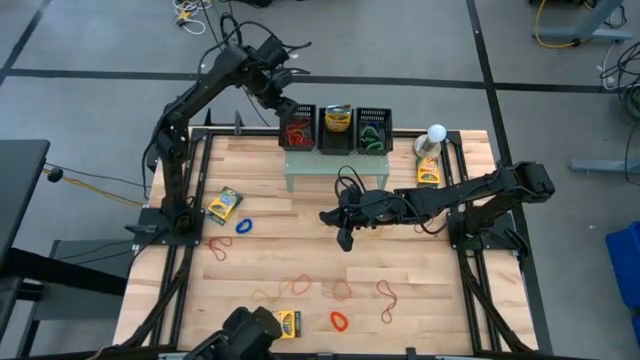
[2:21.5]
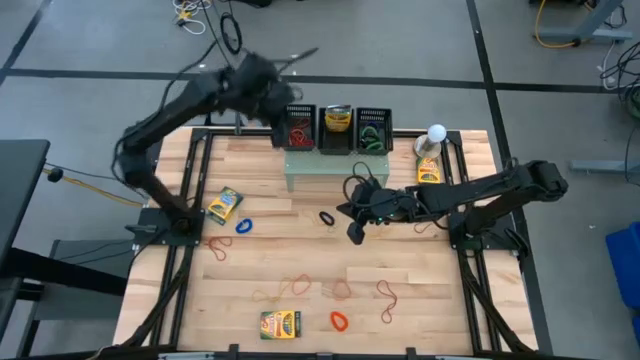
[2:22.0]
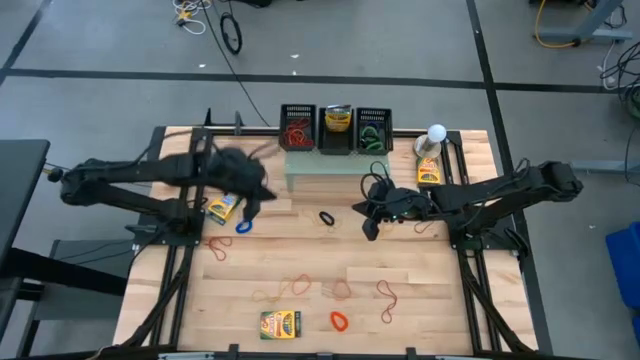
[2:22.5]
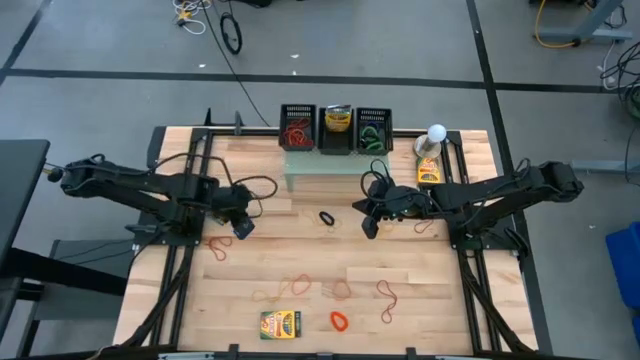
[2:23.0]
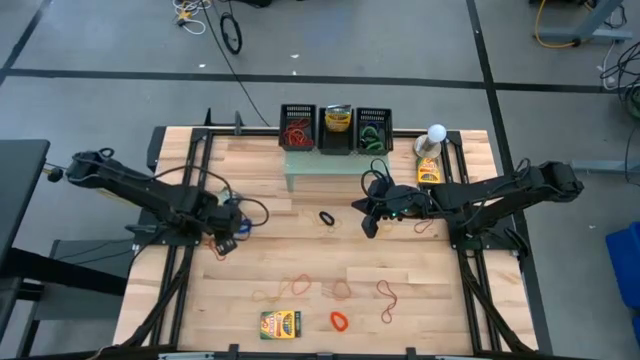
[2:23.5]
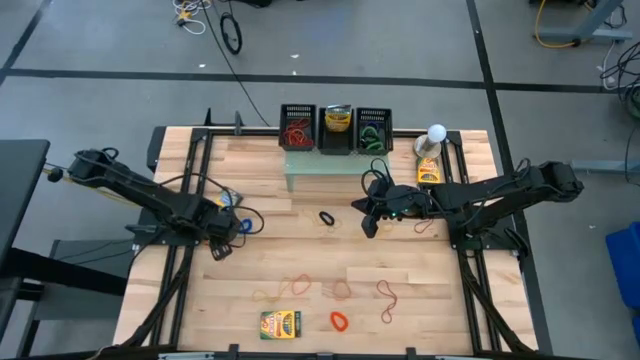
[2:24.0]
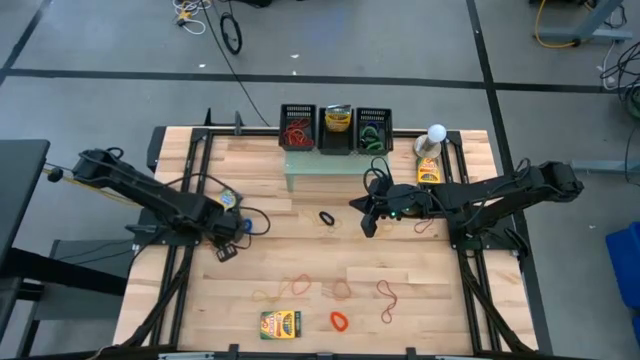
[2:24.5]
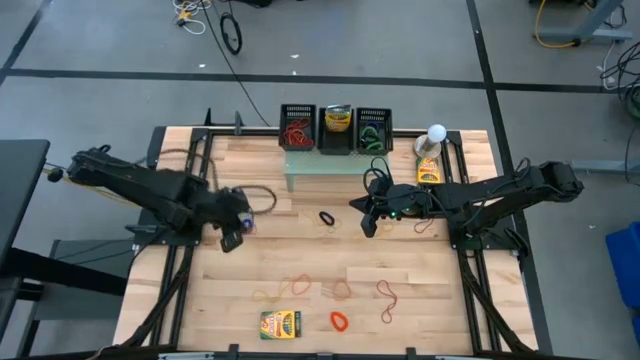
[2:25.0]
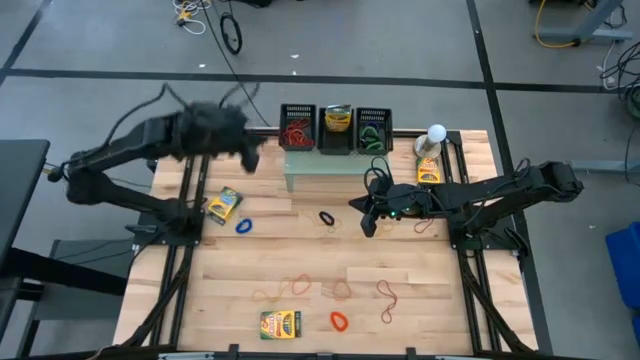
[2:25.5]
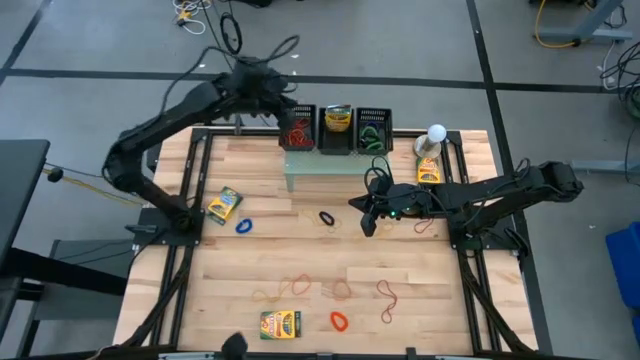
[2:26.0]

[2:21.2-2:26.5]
Task: Pick & Place Office Desk Supplies
Put the red rubber band into the left black bin on the shelf

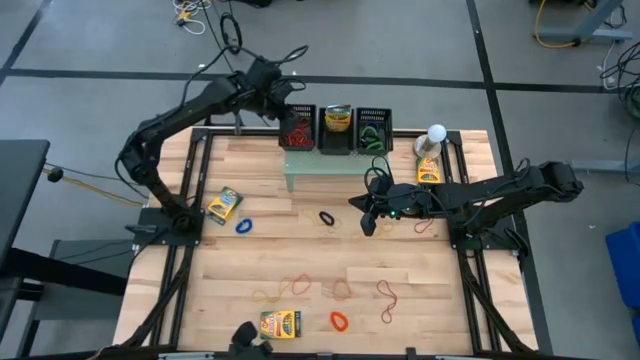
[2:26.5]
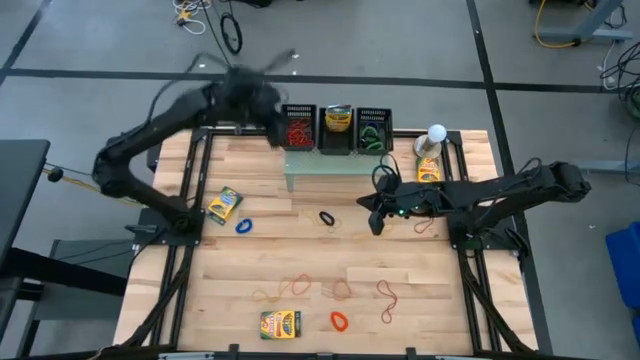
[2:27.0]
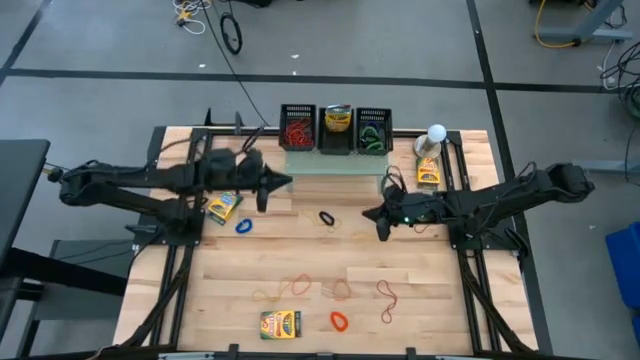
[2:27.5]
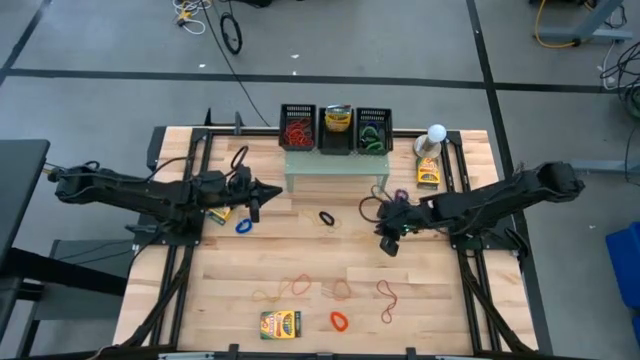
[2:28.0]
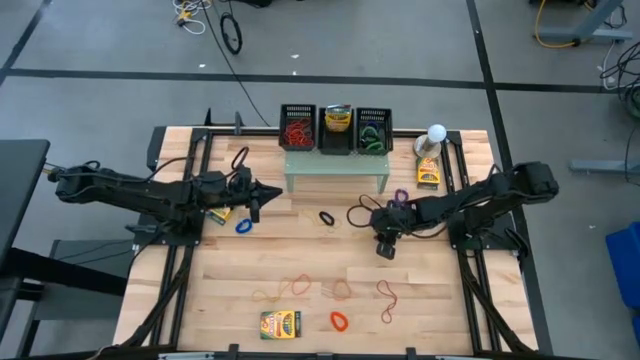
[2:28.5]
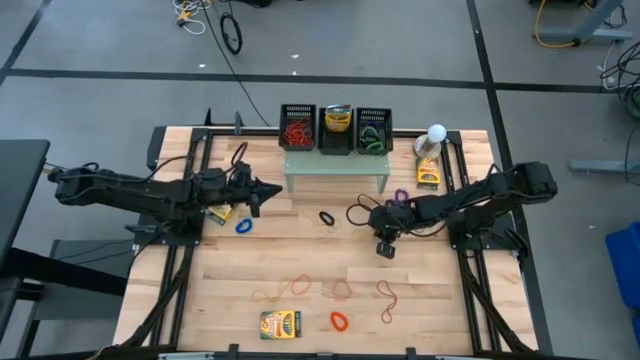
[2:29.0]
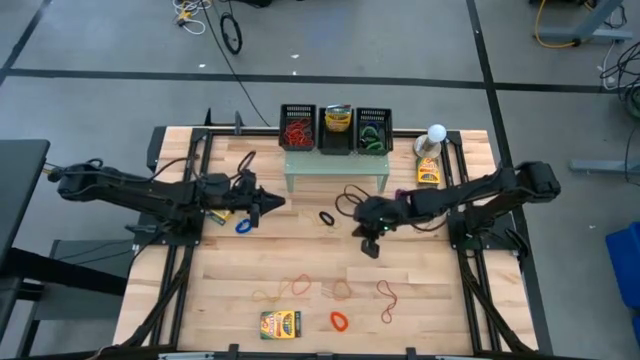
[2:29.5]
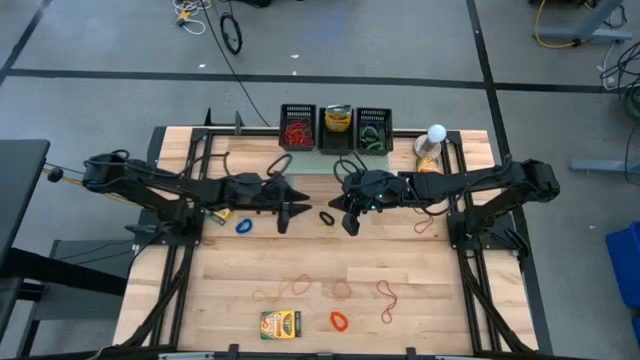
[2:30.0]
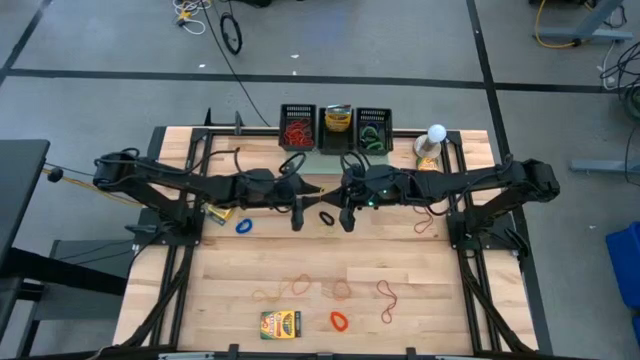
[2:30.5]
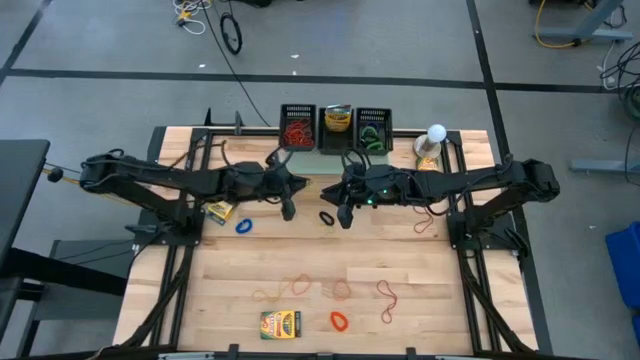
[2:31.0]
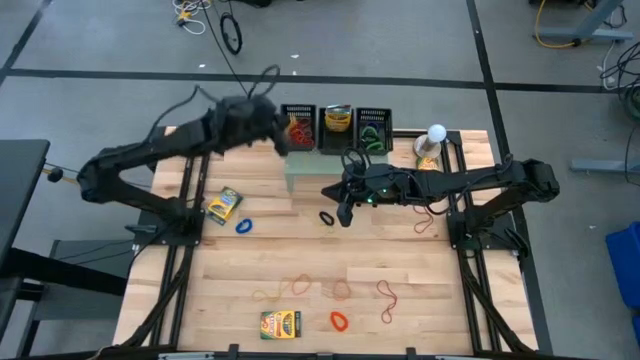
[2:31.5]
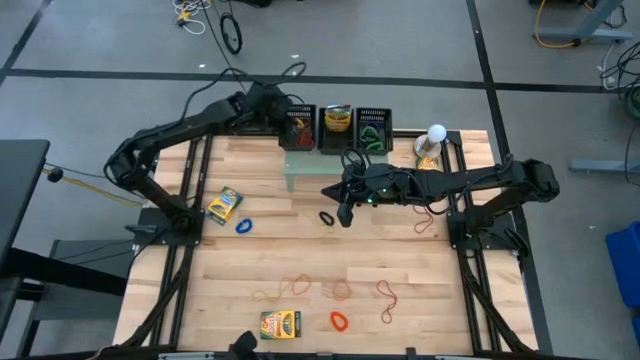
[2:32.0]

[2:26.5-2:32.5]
Put the yellow rubber band into the left black bin on the shelf

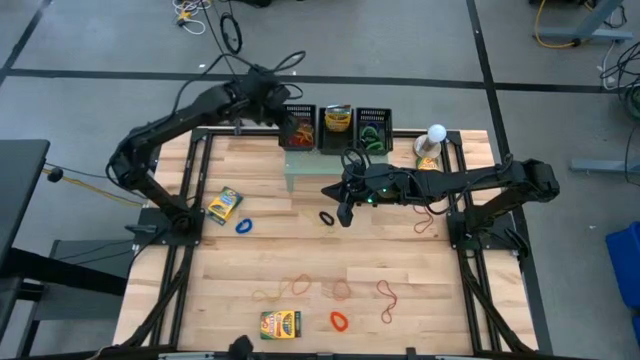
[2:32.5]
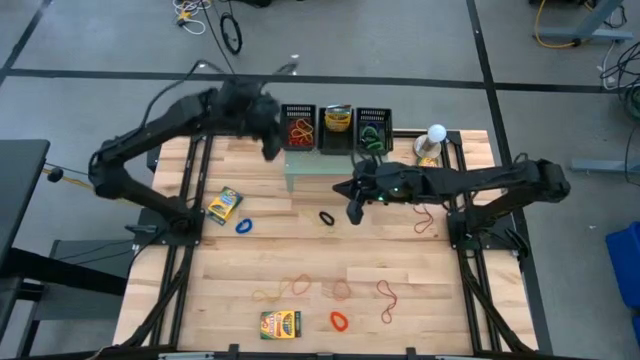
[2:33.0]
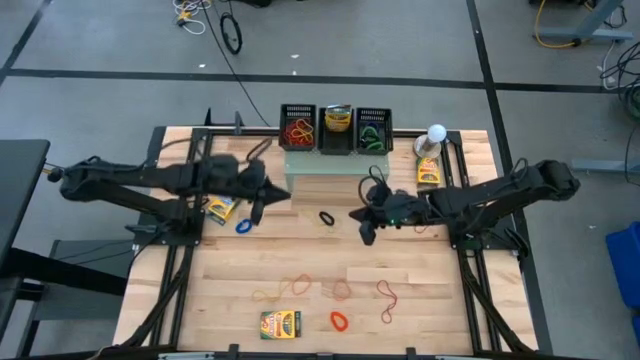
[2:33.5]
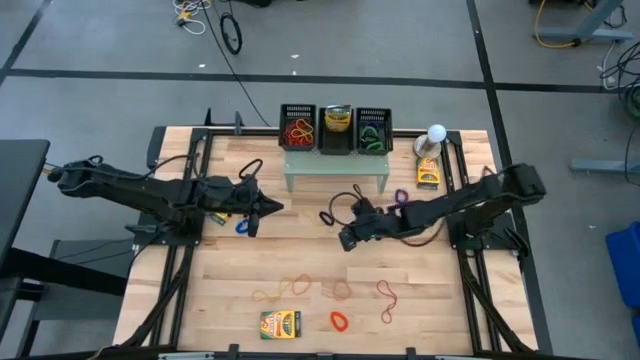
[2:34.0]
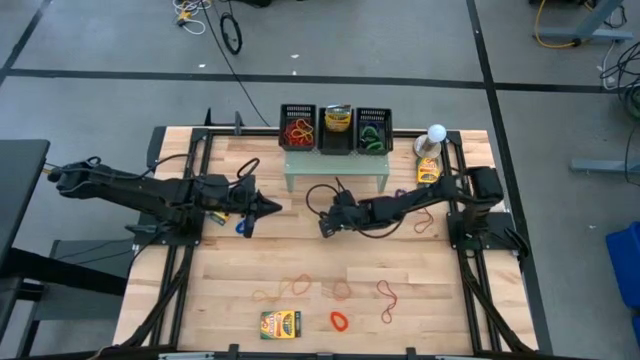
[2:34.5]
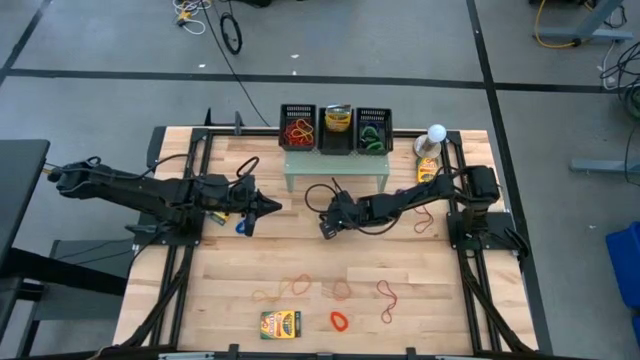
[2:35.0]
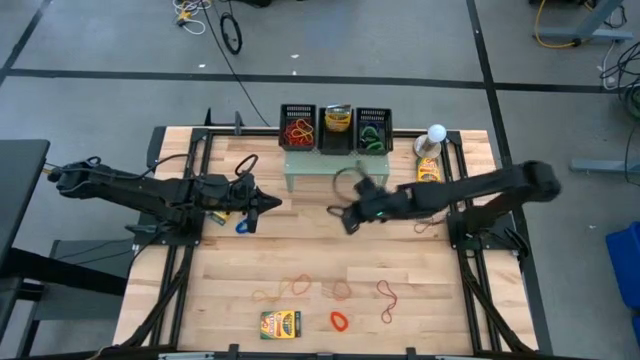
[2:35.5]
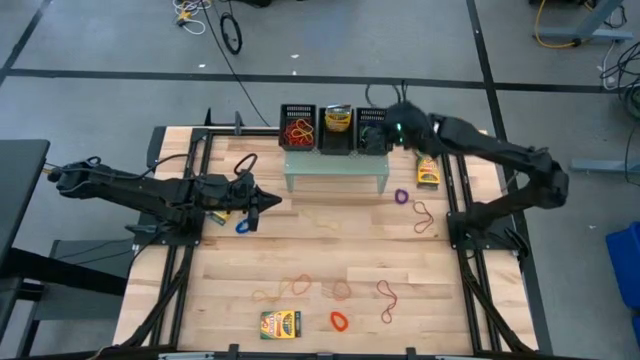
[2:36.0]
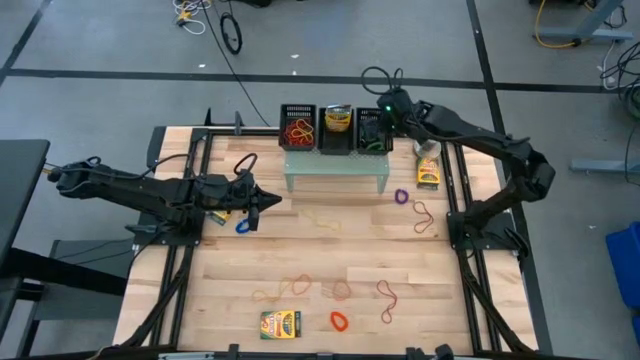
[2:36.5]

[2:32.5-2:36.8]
Put the black spring bracelet into the right black bin on the shelf

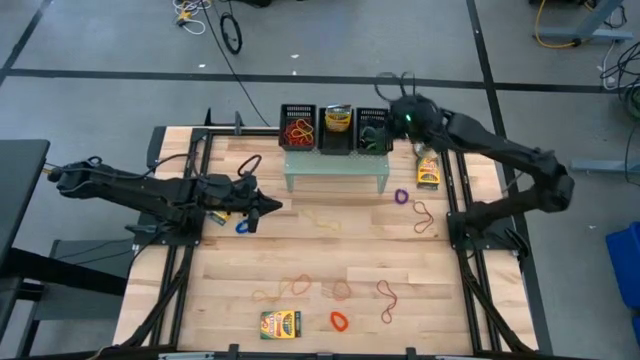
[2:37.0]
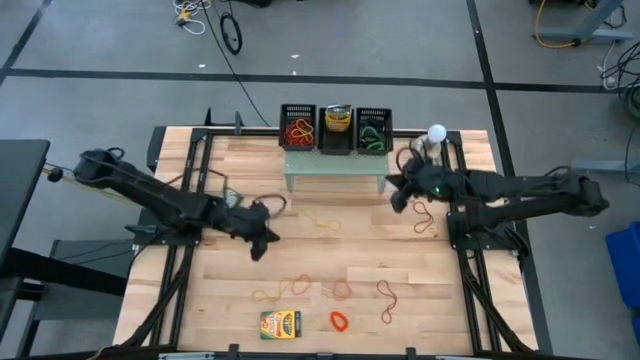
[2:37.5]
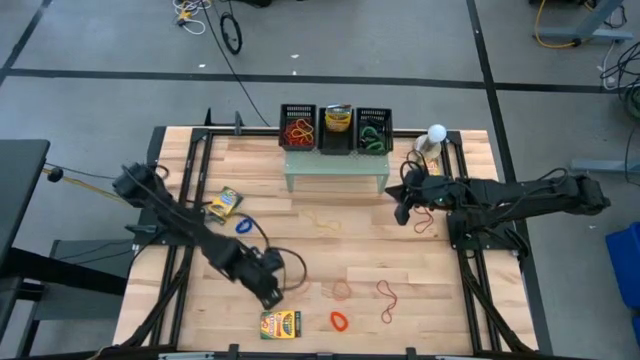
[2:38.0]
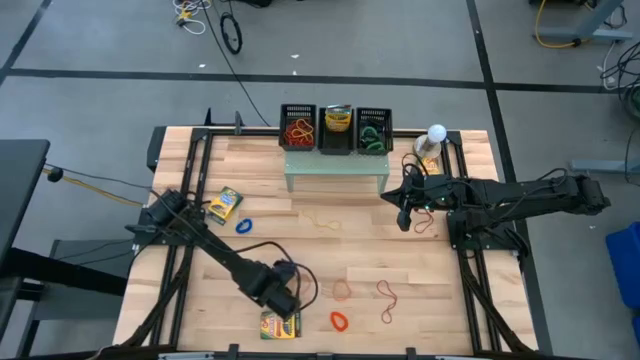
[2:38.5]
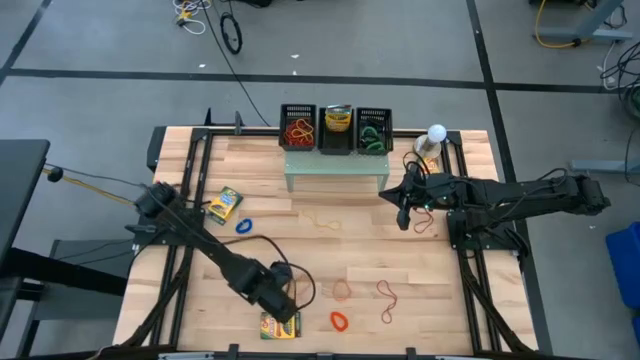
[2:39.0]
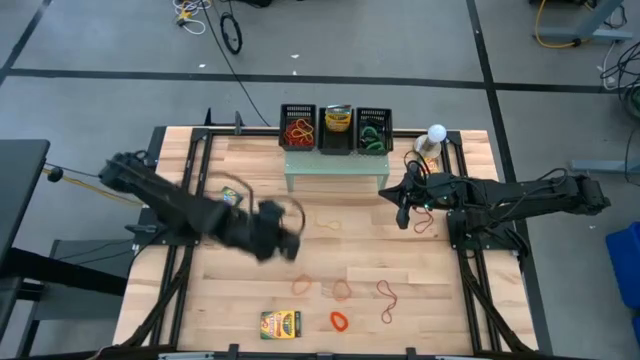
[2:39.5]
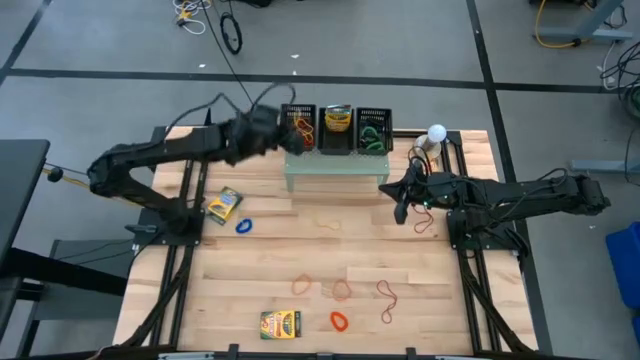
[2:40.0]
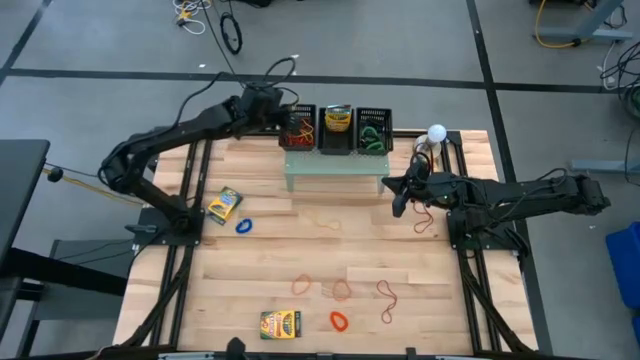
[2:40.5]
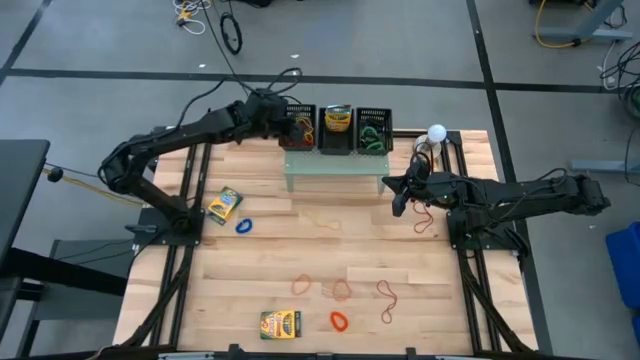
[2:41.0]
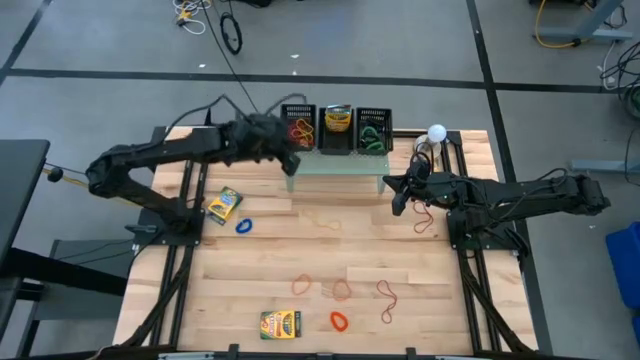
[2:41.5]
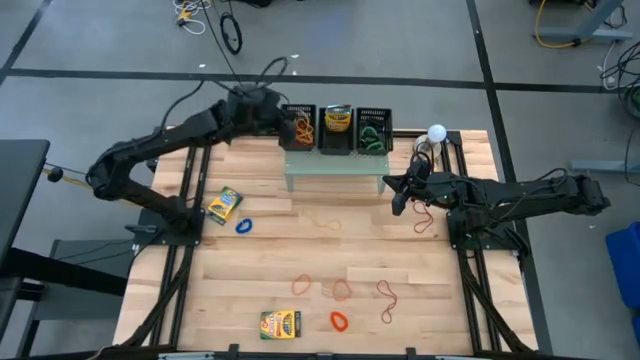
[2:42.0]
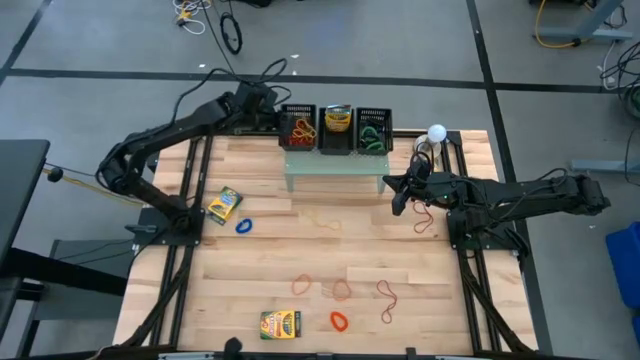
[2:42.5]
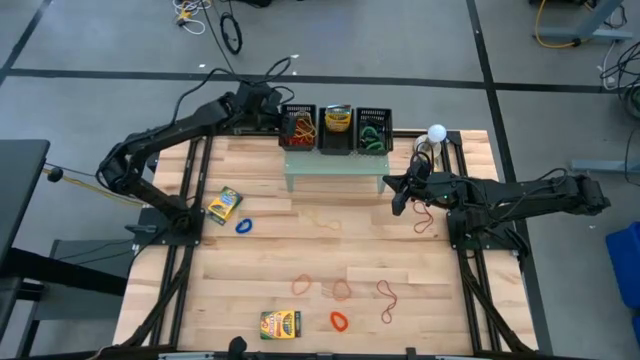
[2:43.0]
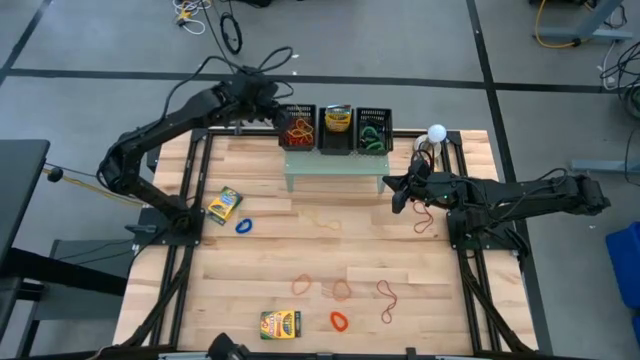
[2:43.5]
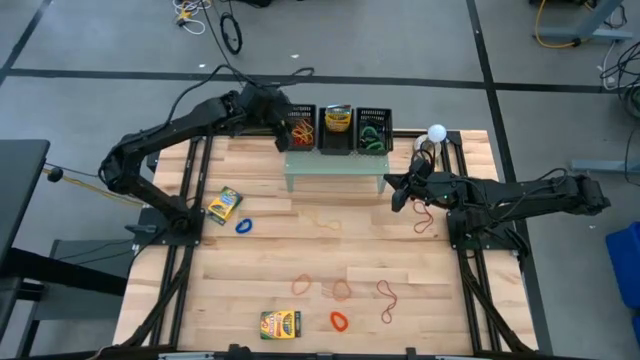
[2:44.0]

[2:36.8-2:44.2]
Put the yellow rubber band into the left black bin on the shelf
